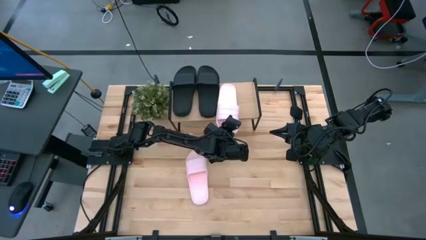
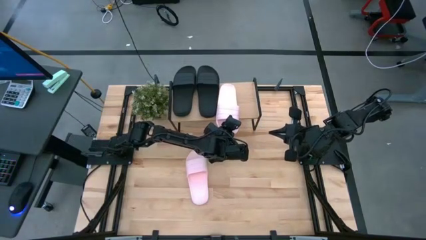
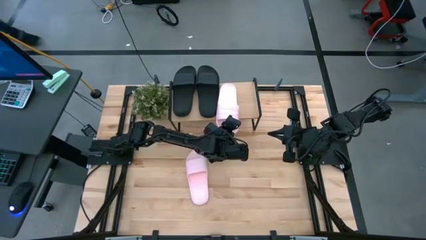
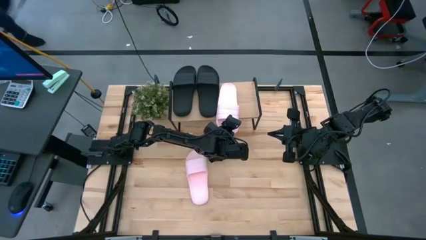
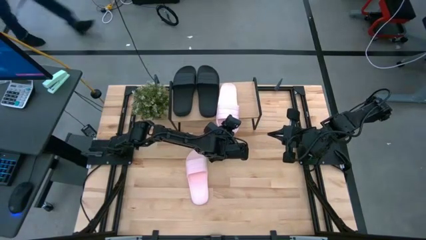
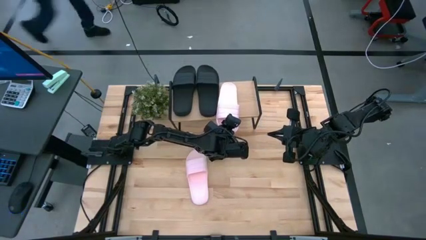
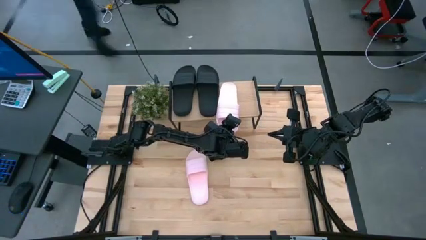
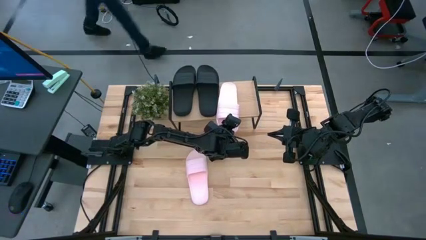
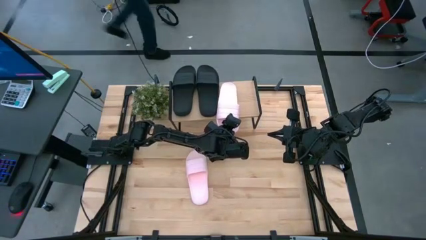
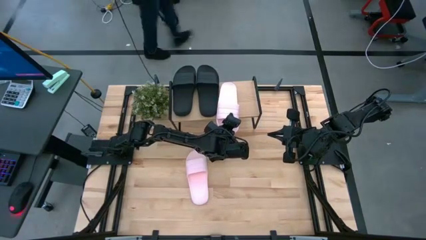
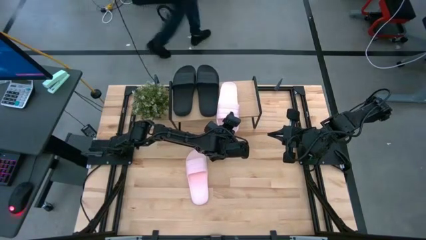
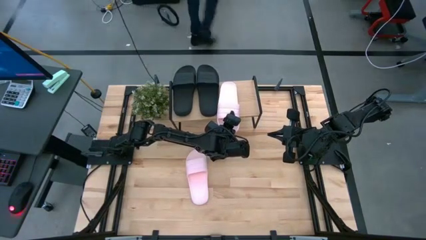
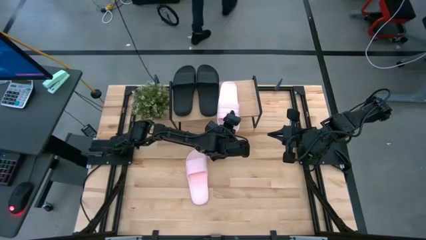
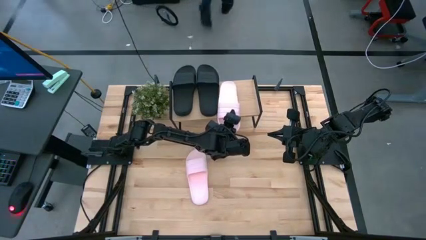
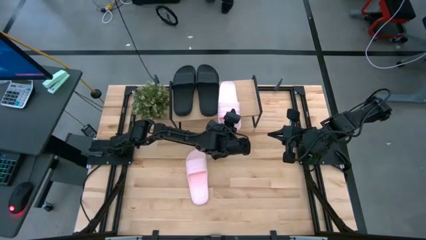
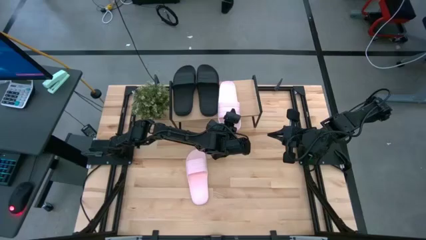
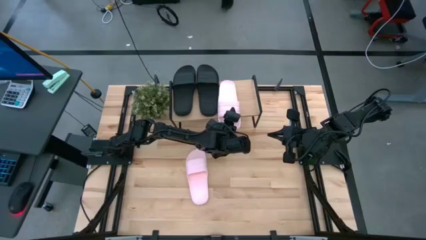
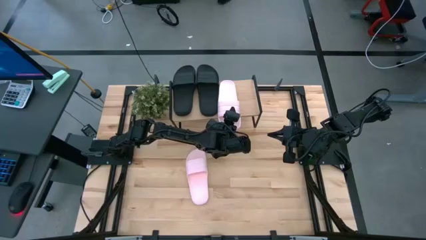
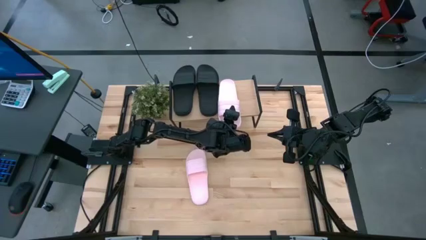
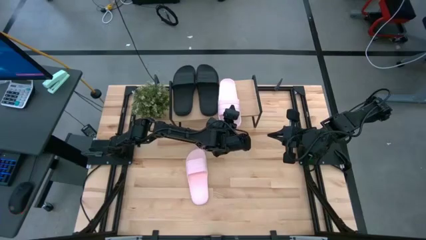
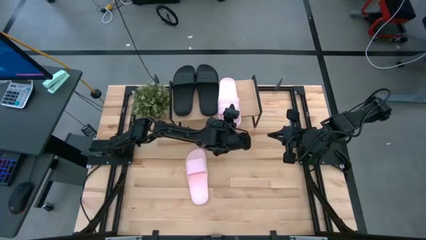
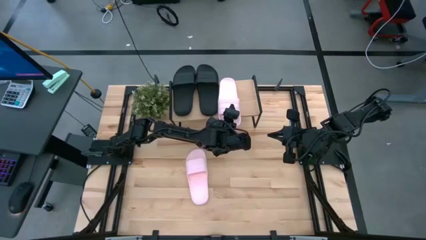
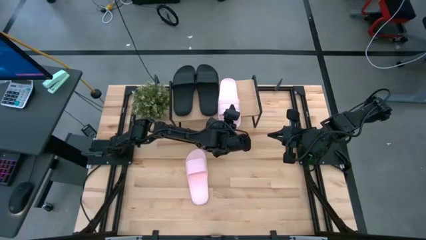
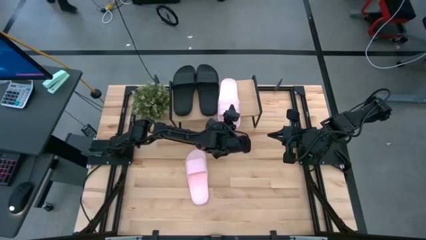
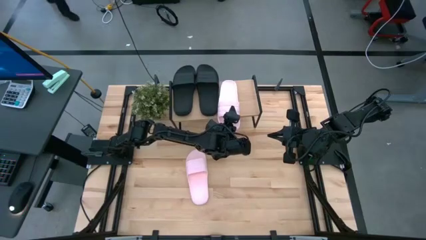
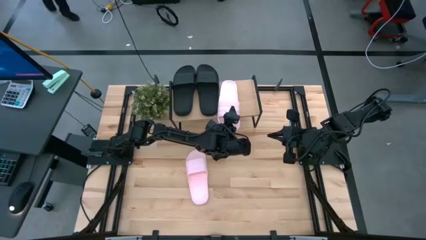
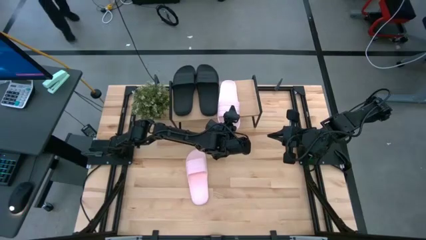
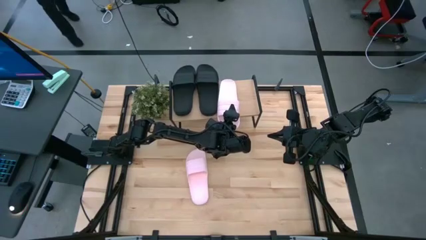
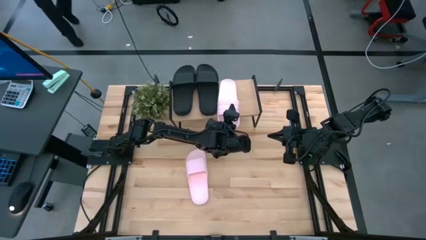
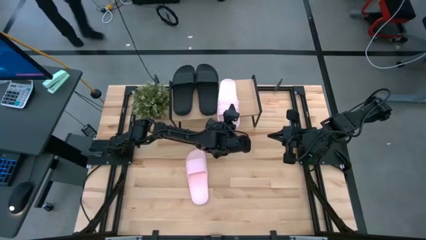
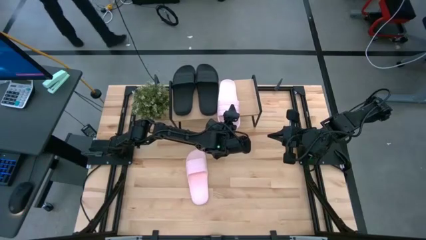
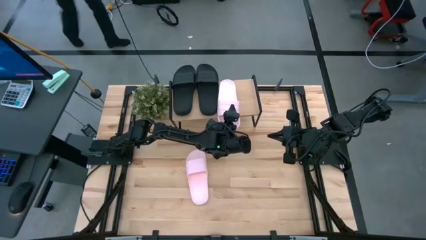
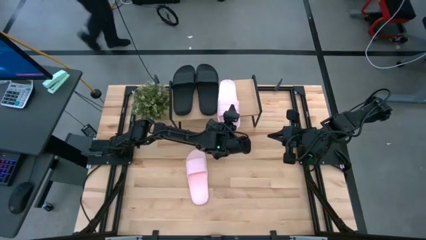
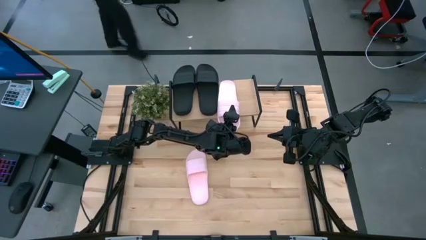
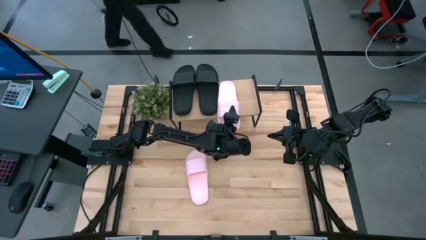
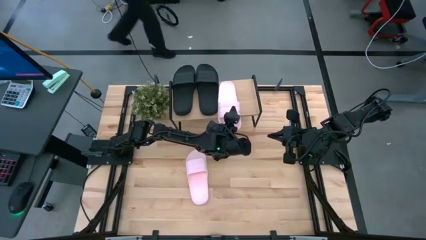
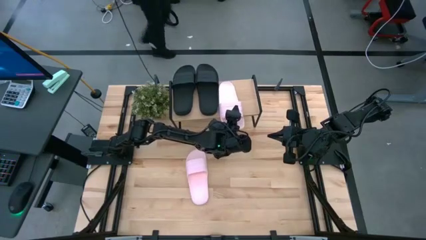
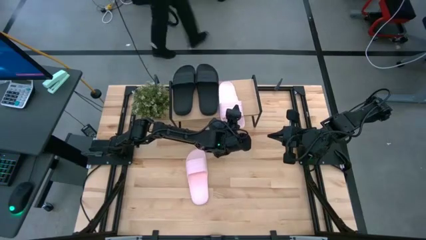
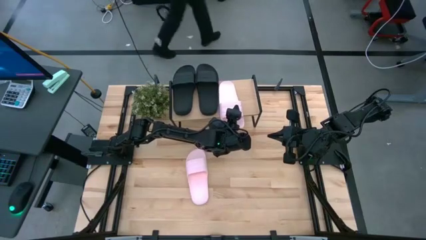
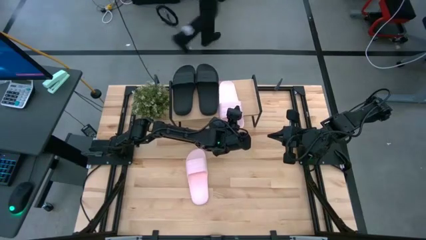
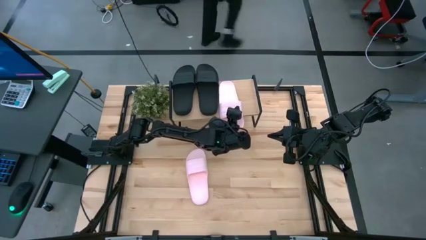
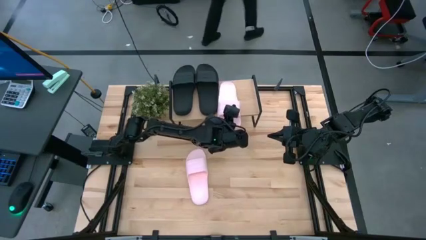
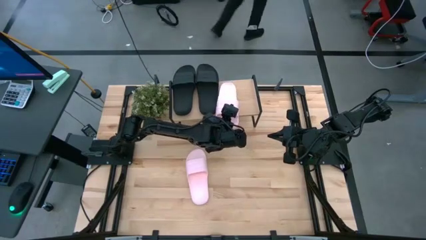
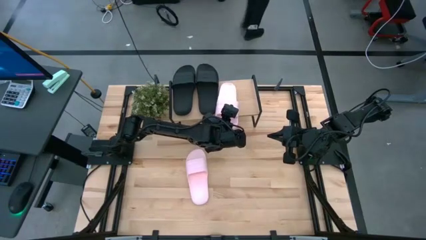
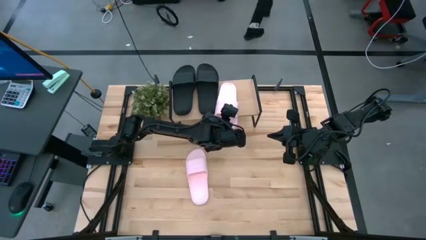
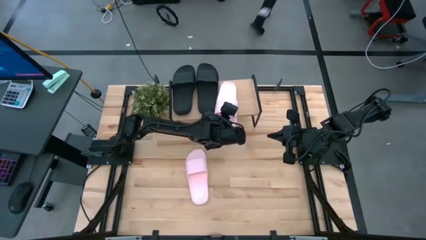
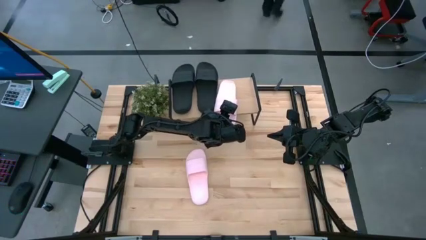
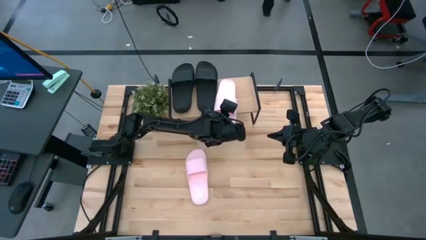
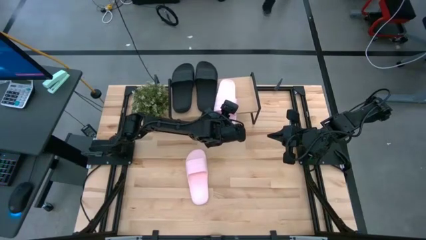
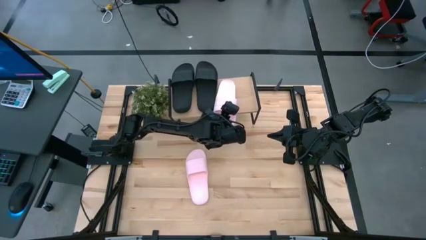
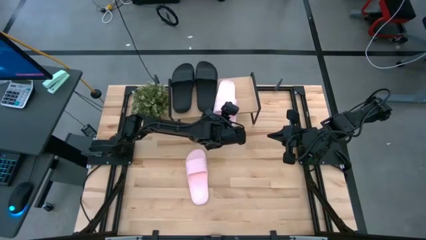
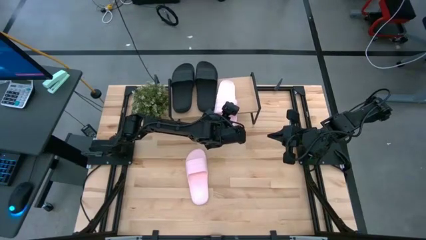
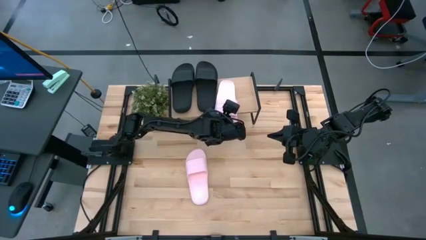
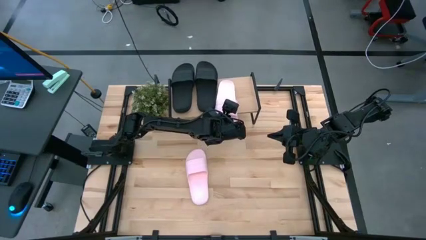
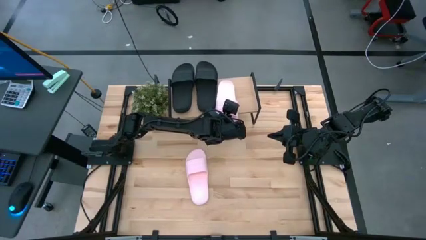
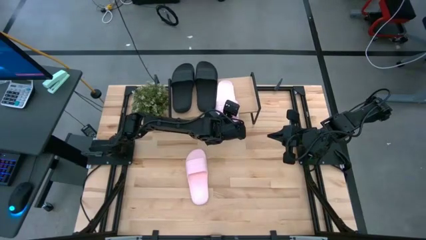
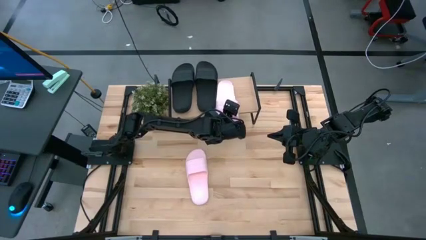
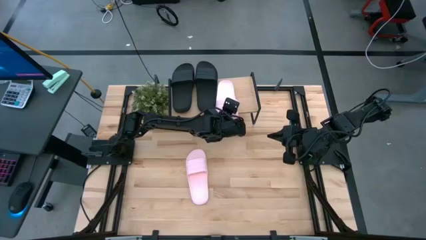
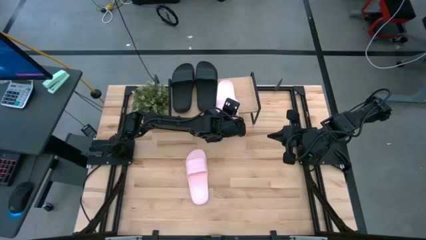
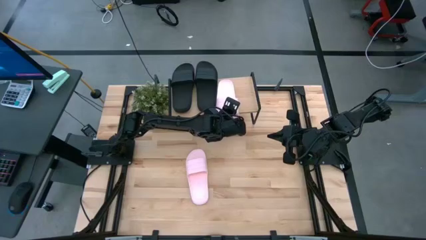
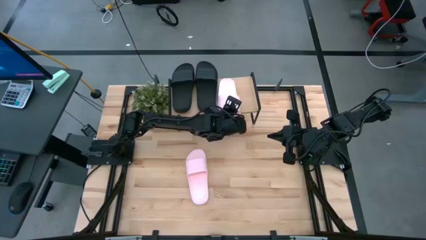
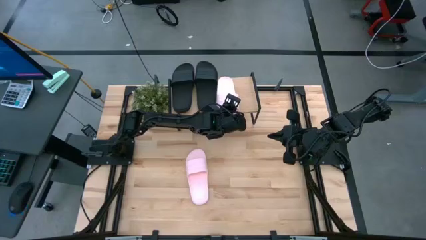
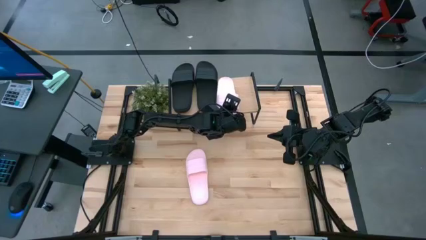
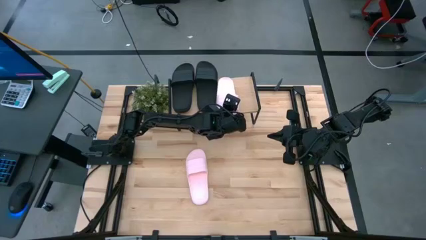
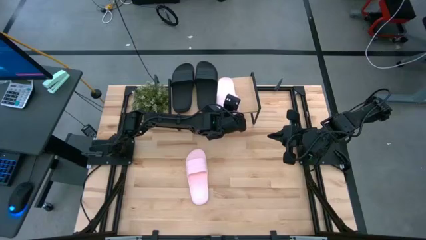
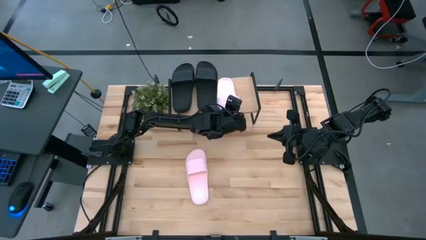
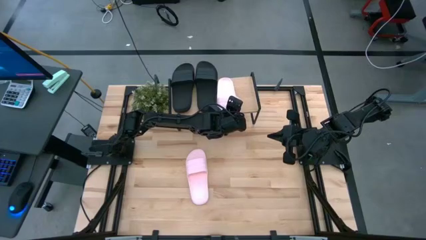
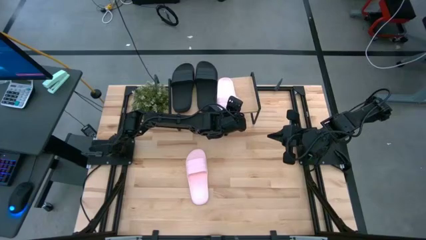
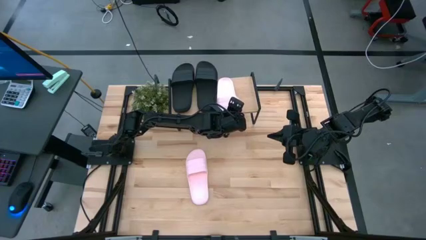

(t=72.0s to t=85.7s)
Task: Pick and place slides into the shelf
Put the top pink slide on the shelf

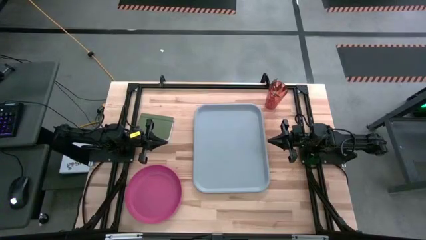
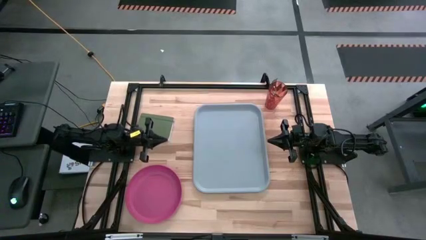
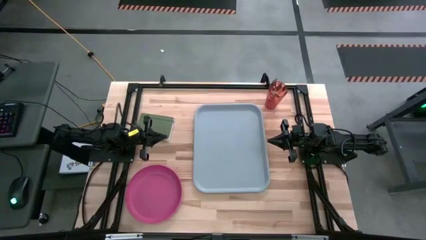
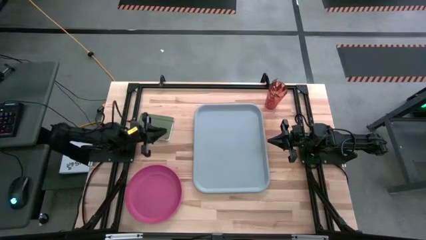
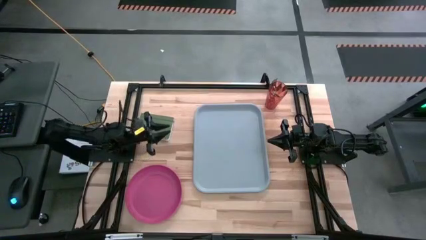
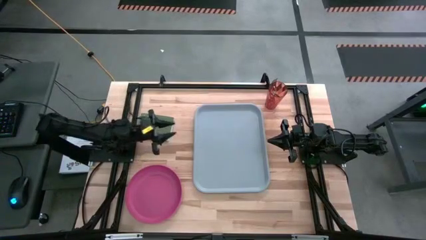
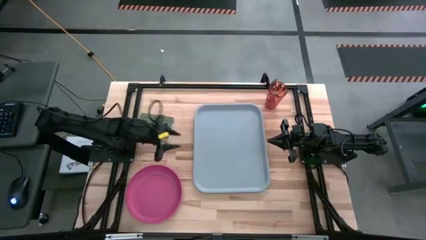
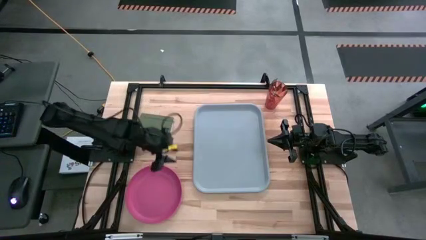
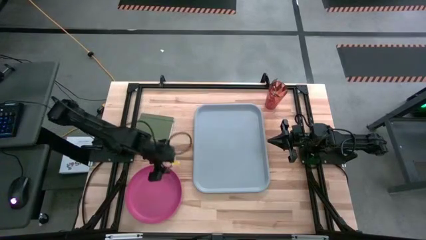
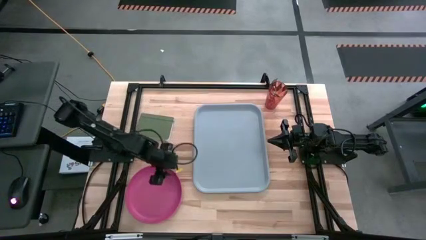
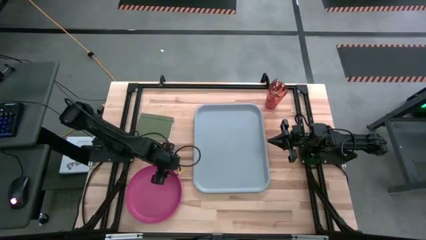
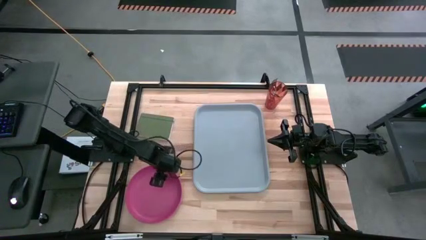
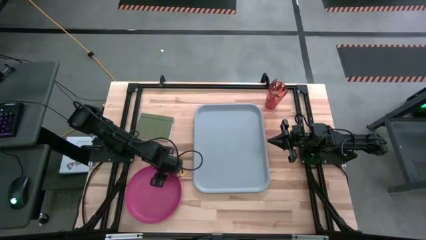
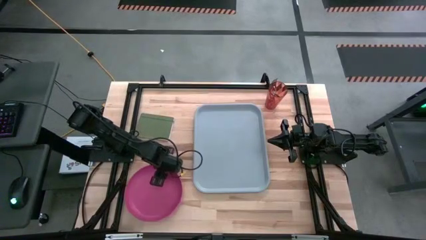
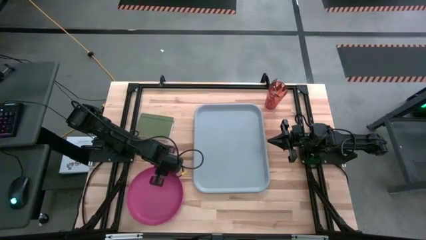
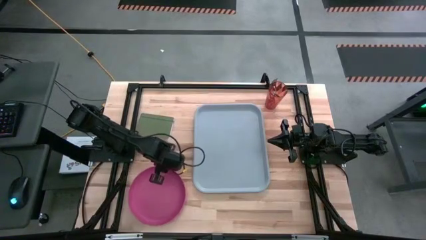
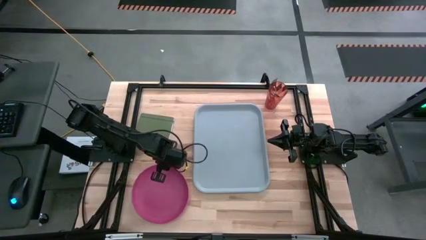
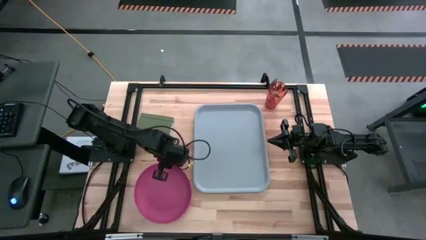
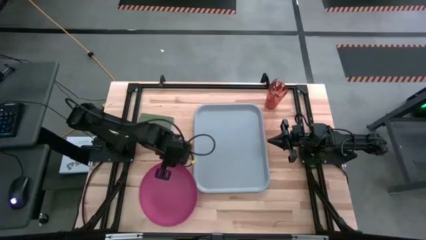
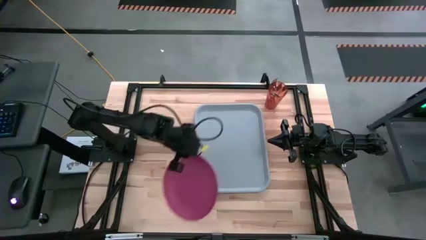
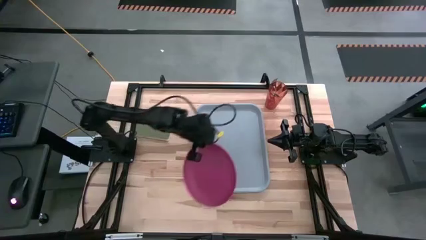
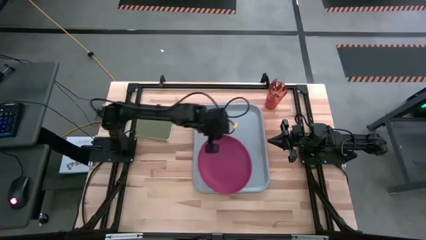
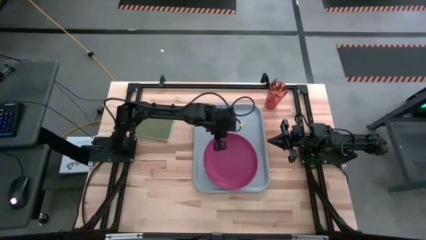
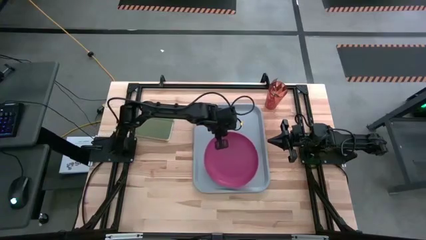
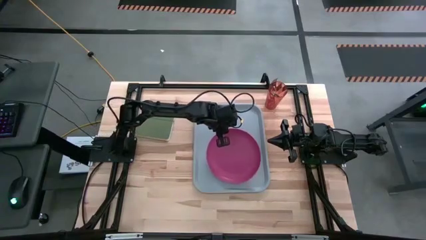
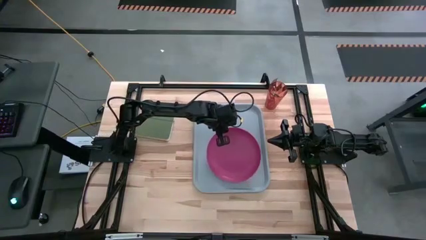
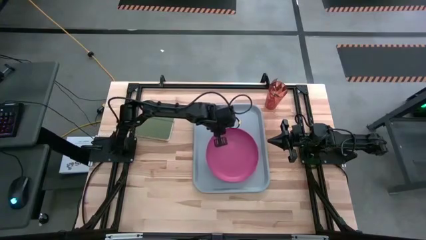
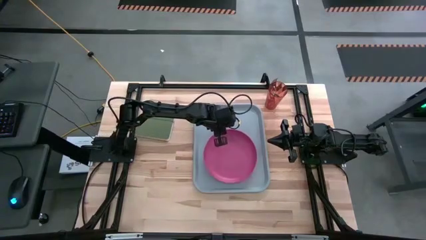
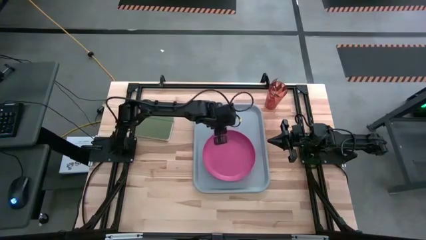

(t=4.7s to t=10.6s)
Task: Pick and place plate/cup/fork/spoon on tray
Put the pink plate on the gray tray
